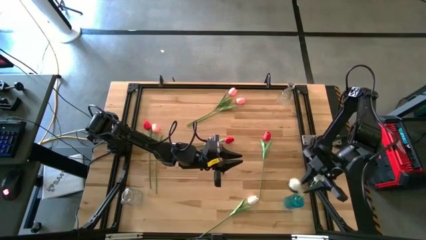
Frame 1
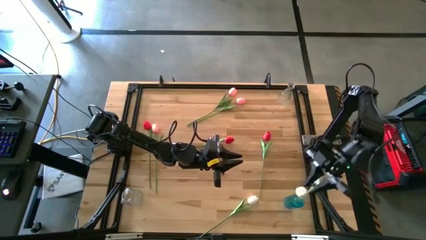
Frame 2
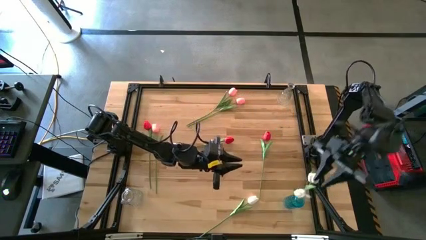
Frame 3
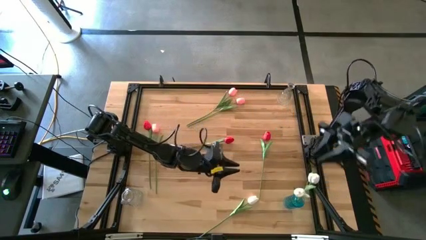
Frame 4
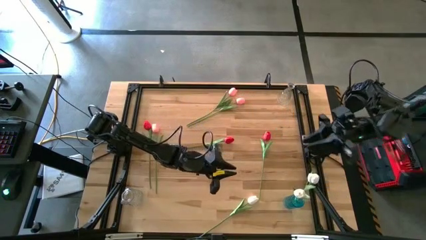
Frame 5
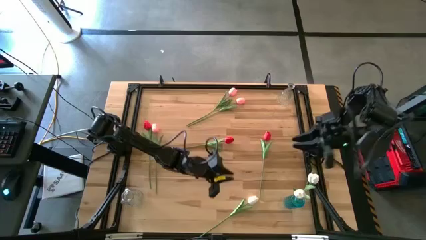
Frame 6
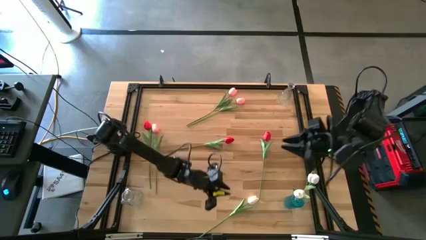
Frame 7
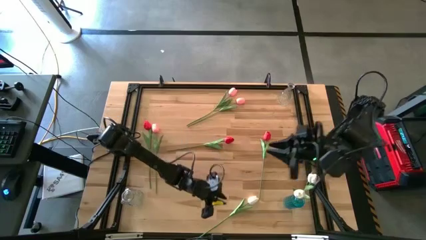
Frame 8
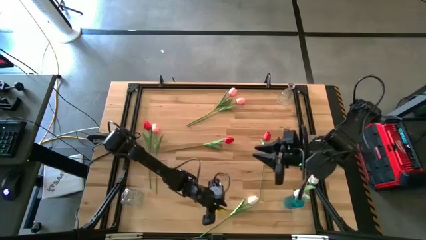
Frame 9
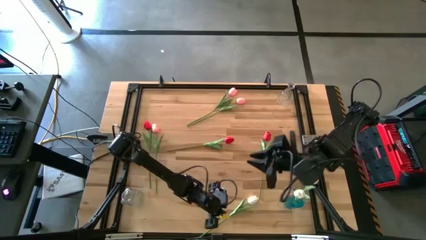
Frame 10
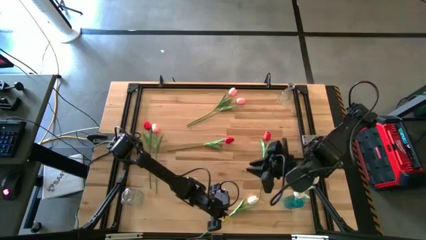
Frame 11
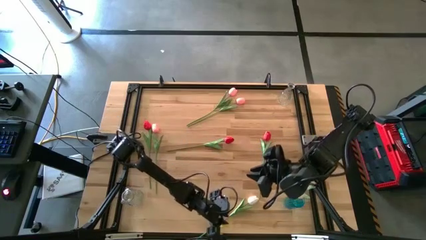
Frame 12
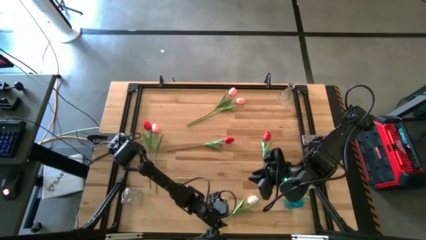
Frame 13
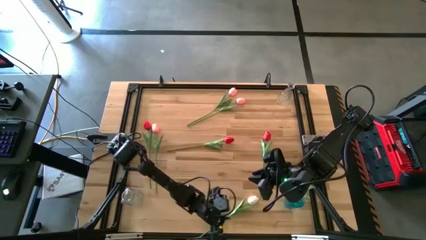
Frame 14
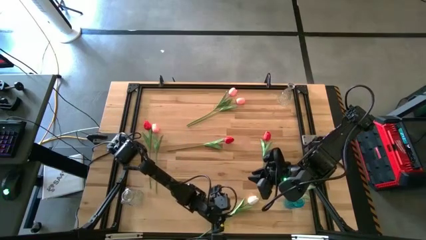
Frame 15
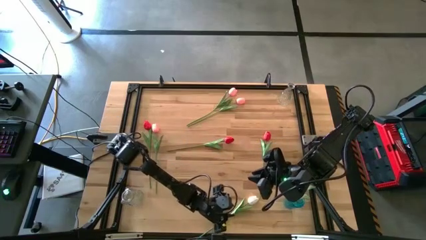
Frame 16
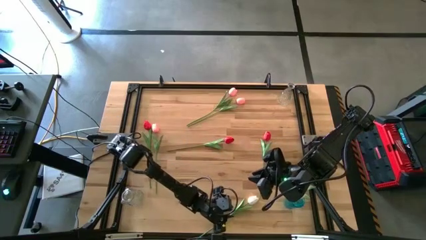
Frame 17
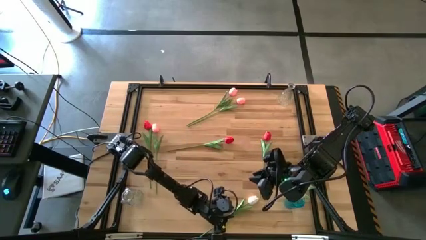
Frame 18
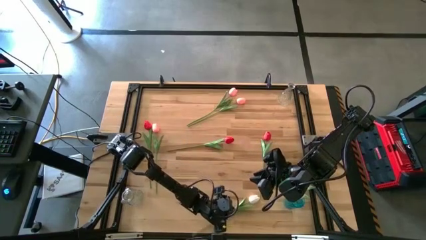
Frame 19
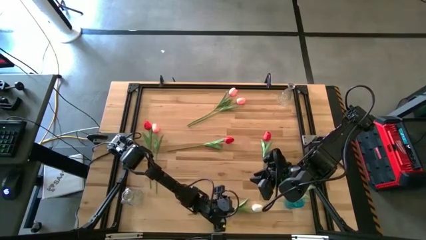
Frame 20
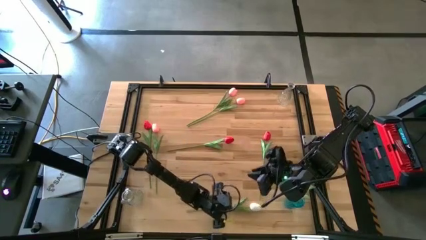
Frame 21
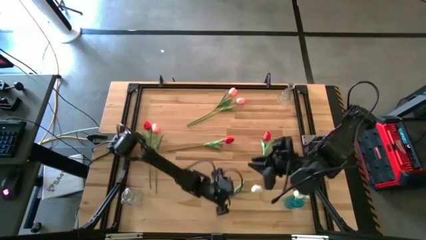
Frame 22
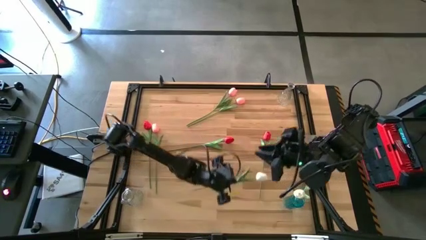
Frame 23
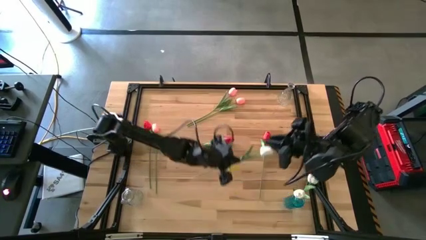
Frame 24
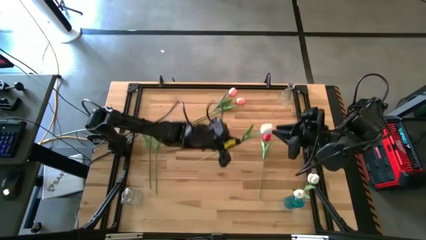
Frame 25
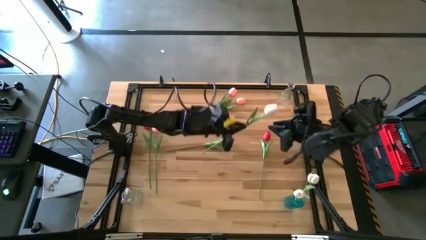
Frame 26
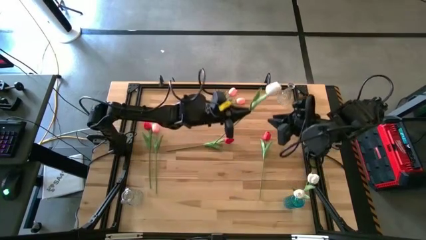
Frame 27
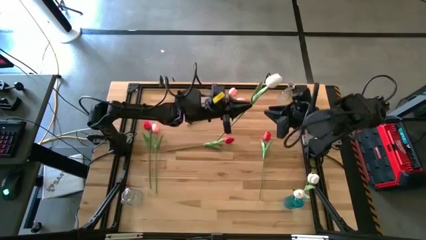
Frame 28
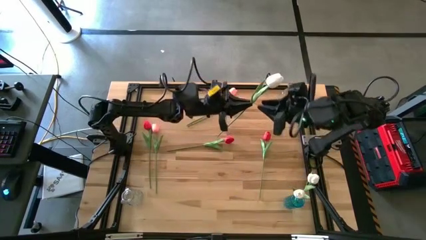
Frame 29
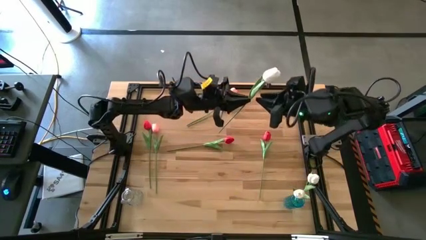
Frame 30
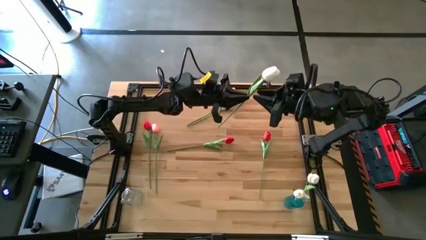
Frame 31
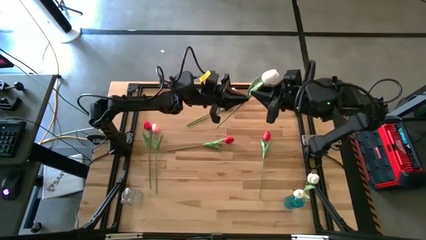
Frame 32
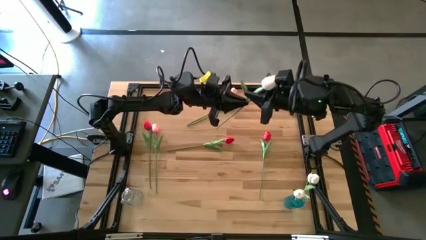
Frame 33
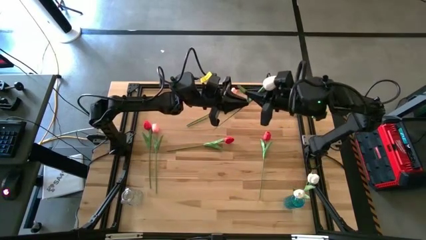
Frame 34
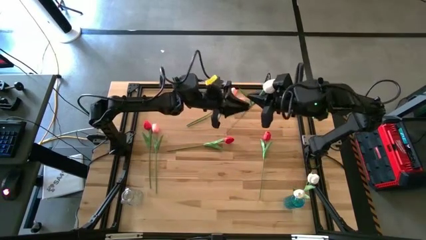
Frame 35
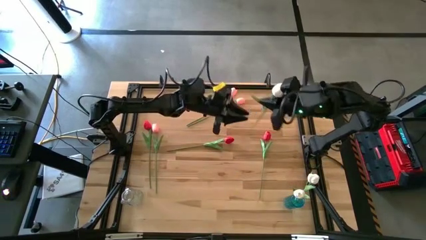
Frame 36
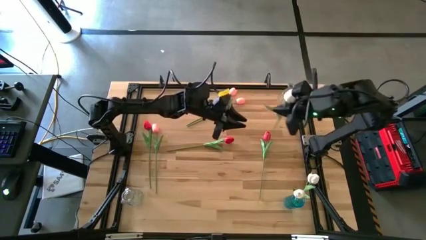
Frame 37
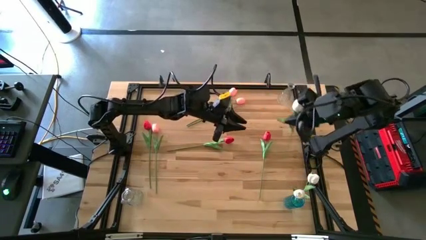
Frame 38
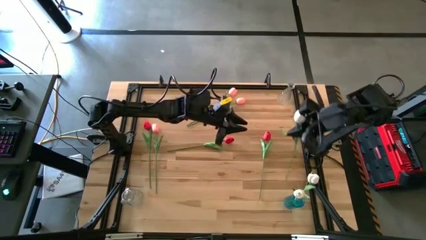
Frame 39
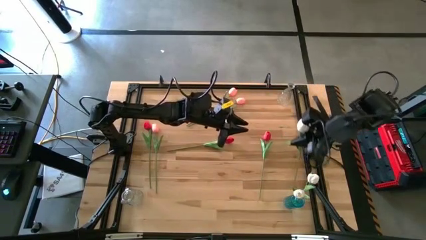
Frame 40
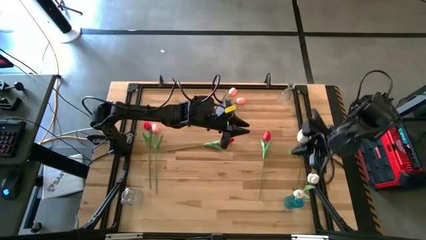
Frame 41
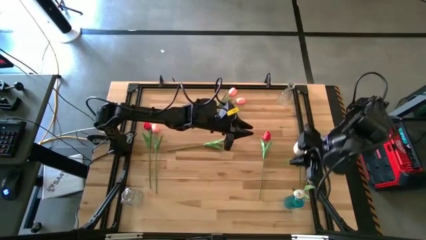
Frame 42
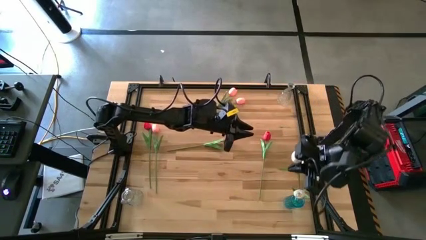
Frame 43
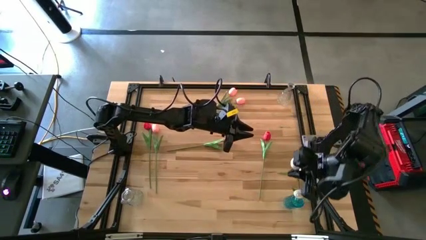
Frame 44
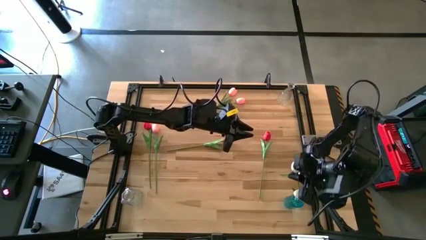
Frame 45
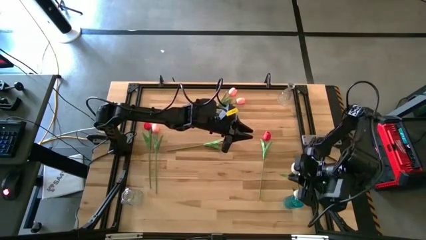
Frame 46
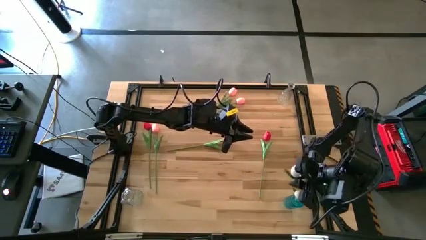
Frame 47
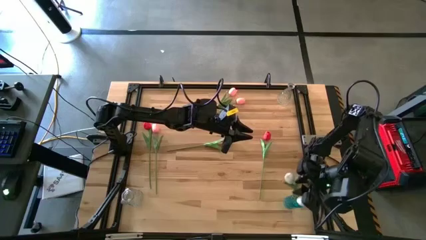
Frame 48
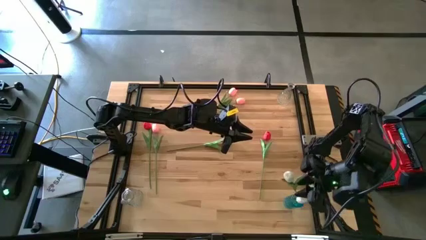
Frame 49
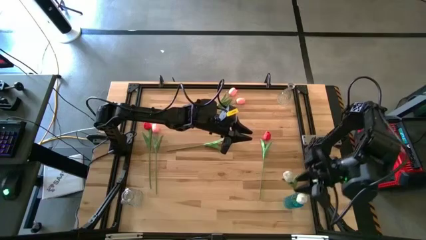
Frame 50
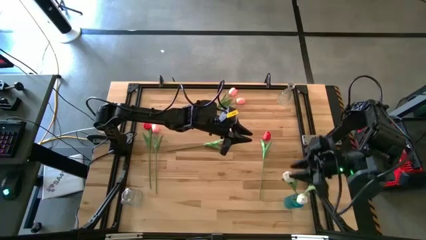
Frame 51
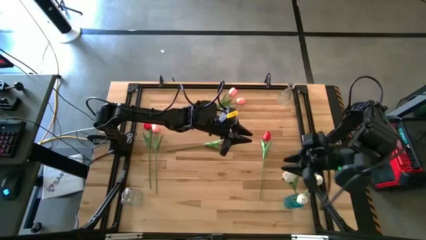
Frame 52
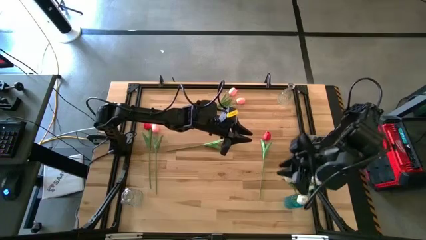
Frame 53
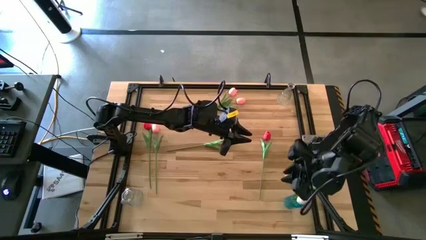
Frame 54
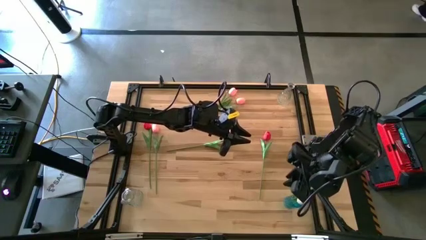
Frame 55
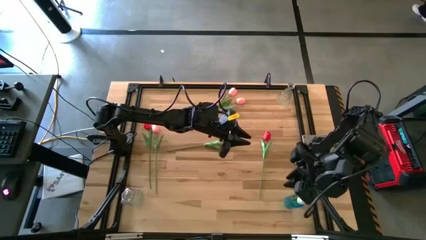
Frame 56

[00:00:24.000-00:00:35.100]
Task: Sort flowers into vase by color
Put the white flower into the blue vase

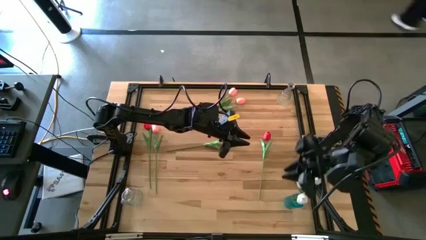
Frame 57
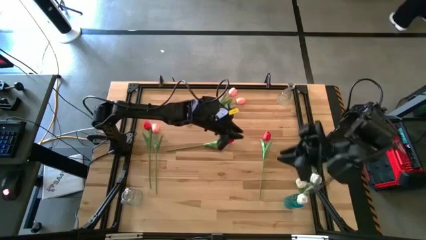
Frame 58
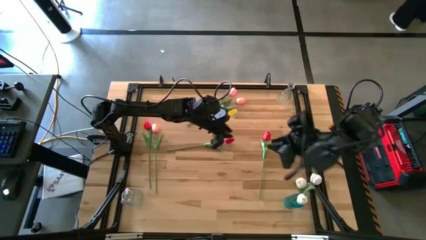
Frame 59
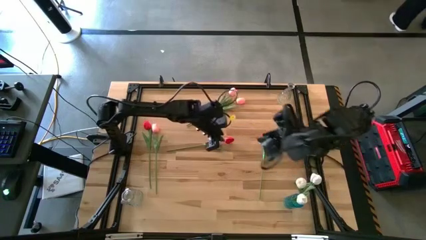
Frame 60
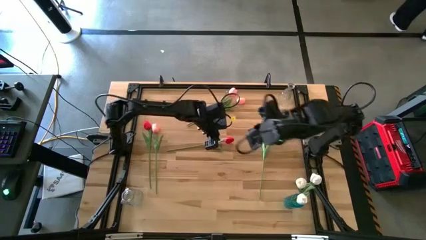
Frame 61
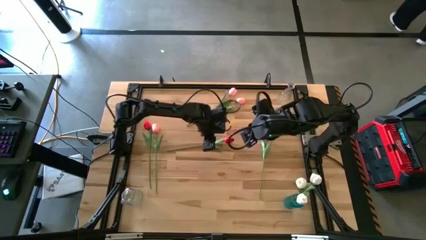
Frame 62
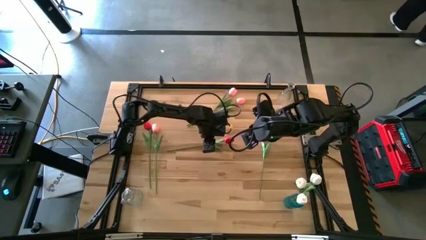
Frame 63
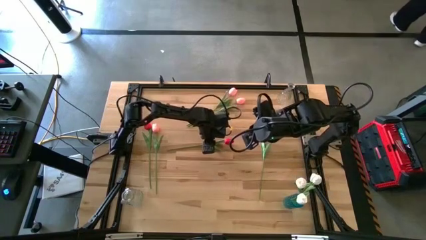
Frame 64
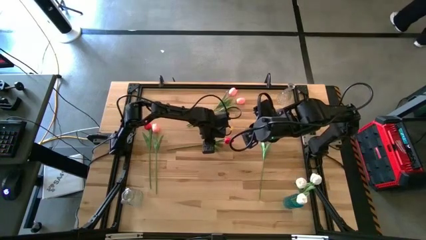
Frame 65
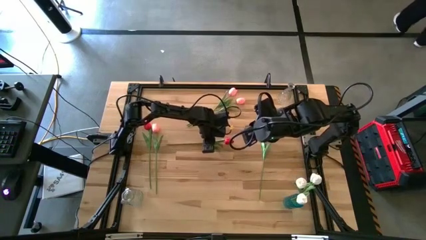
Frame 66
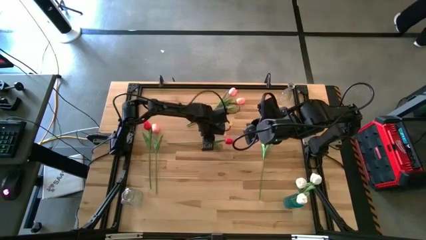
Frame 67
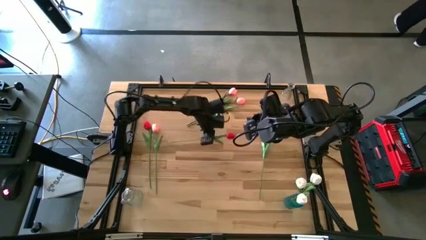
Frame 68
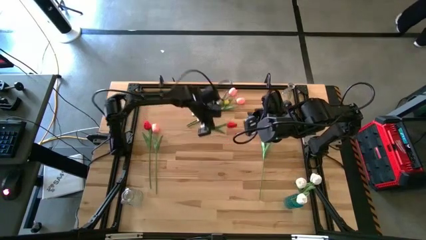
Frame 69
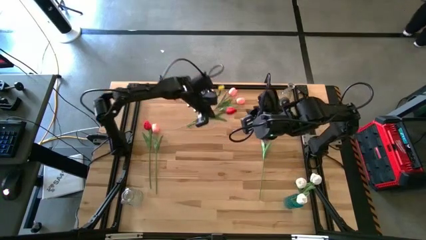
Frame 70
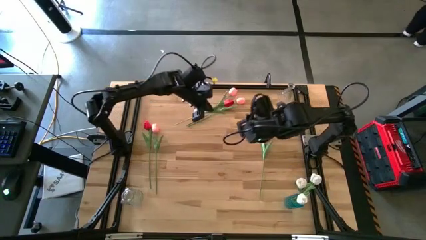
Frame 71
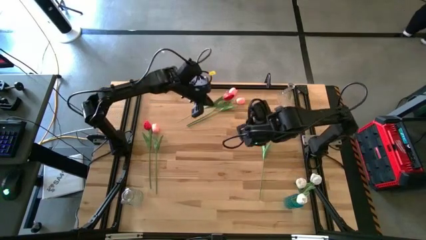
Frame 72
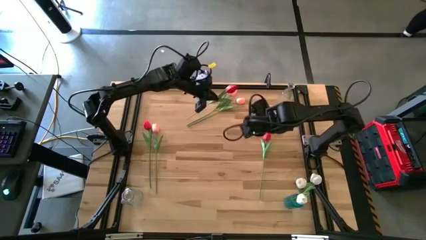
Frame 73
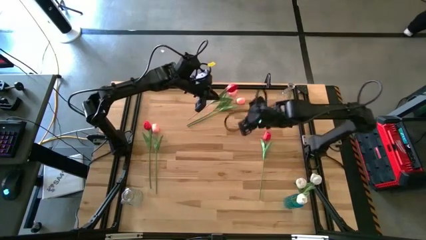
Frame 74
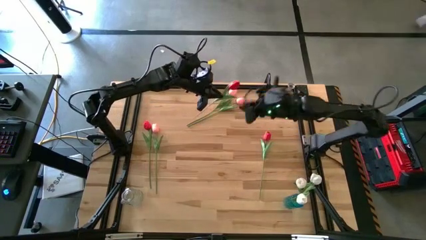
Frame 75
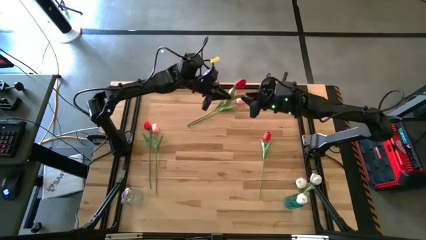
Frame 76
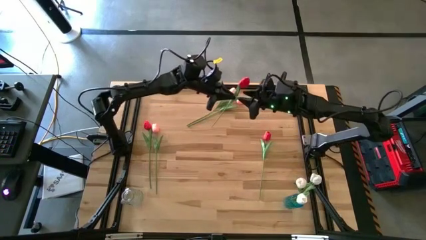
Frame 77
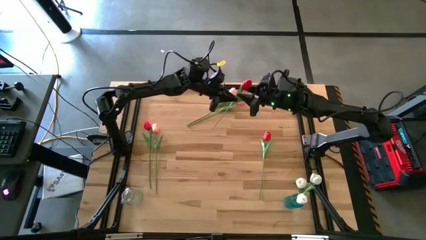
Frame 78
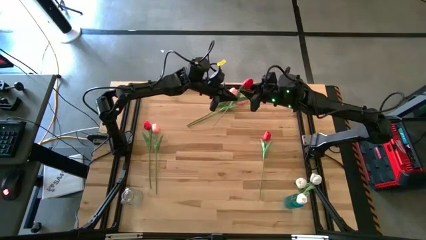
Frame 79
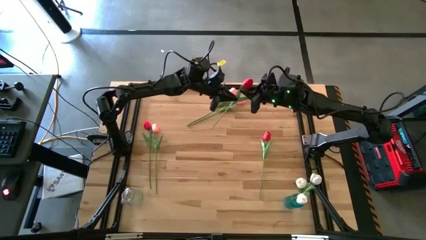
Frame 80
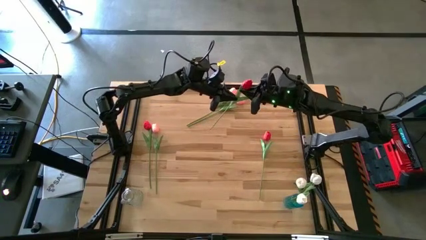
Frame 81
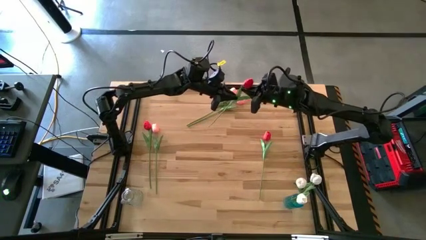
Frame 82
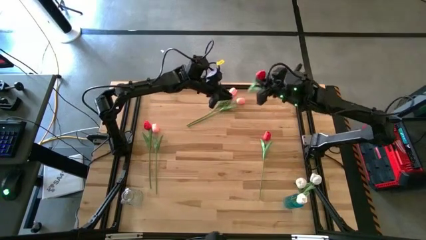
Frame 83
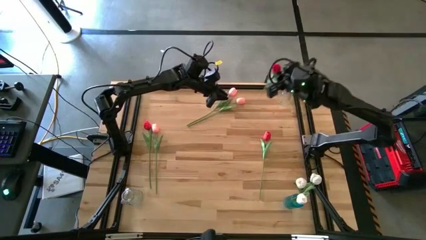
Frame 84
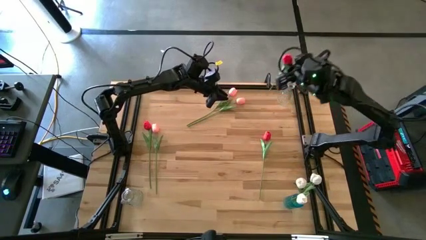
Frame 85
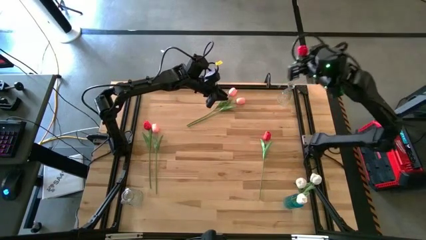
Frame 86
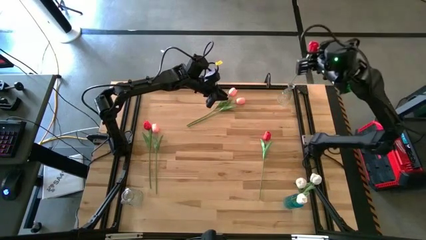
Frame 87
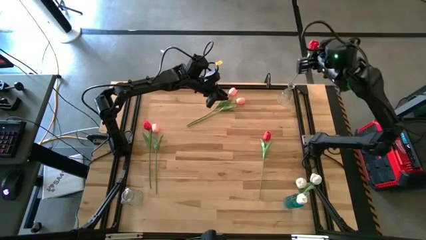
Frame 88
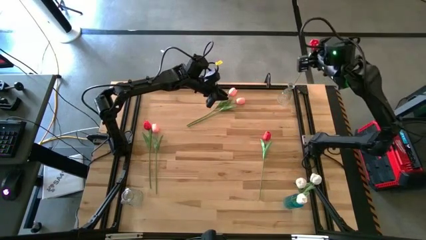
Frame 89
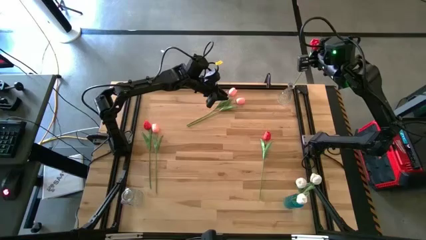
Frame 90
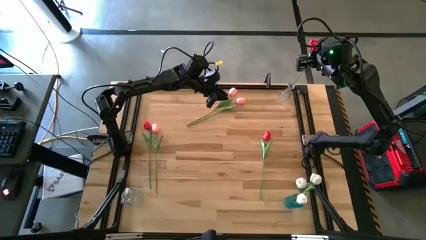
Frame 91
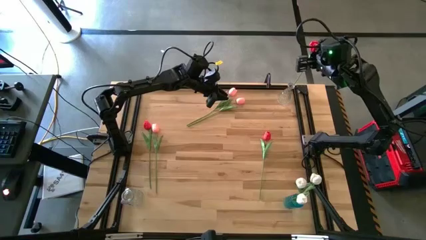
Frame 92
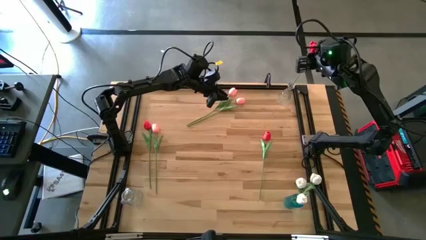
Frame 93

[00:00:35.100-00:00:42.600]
Put the center red flower into the top transparent vase
